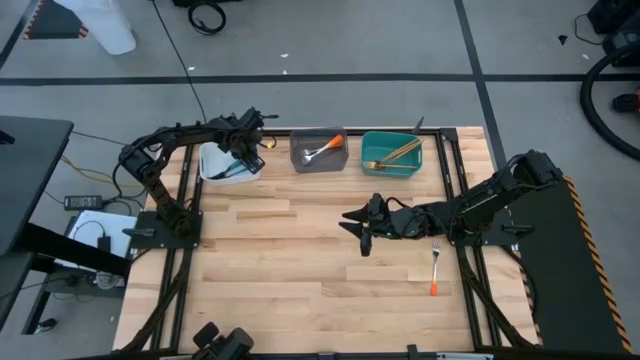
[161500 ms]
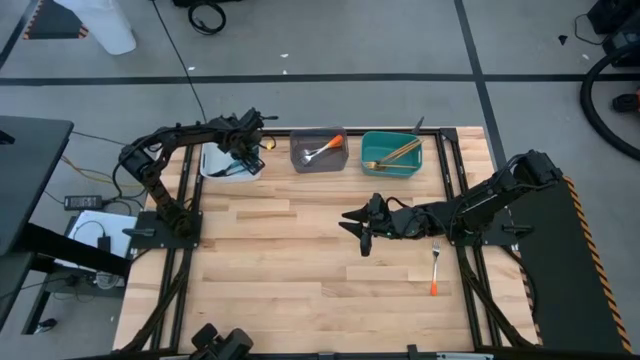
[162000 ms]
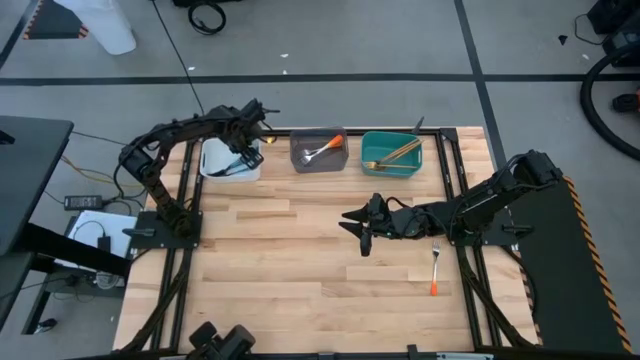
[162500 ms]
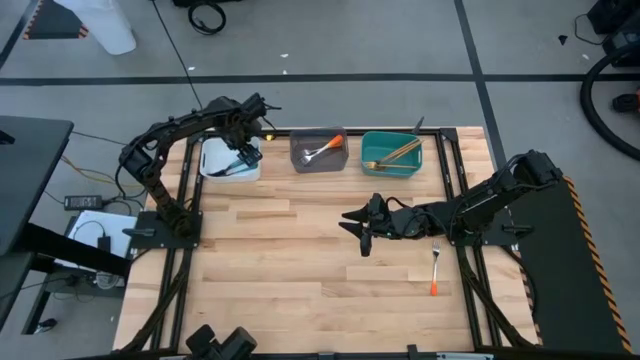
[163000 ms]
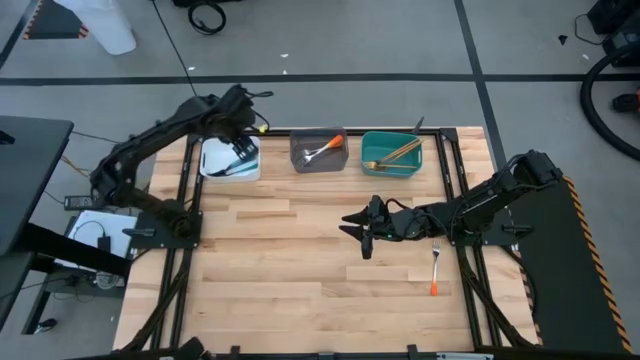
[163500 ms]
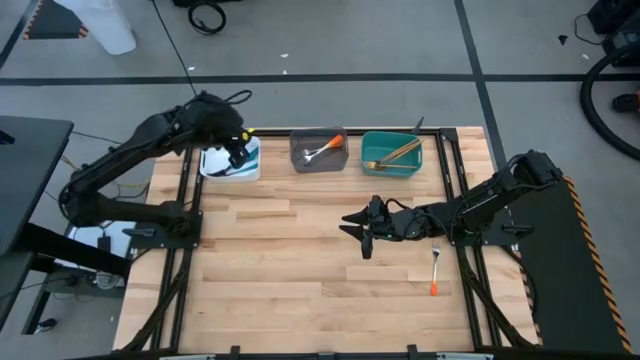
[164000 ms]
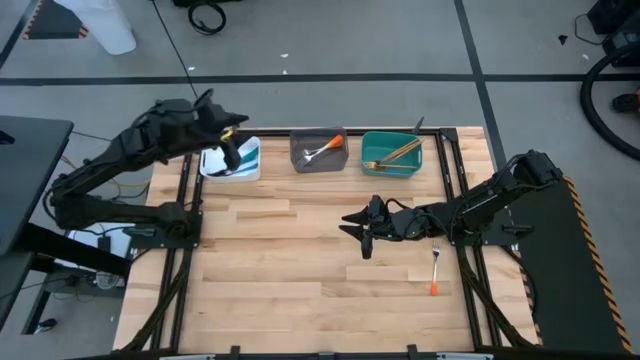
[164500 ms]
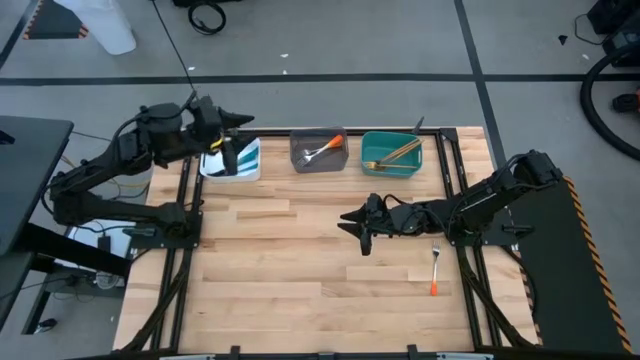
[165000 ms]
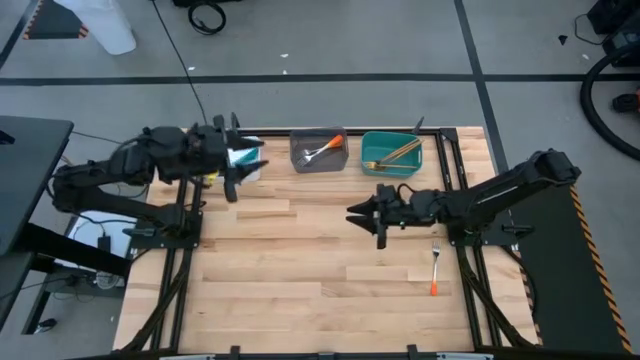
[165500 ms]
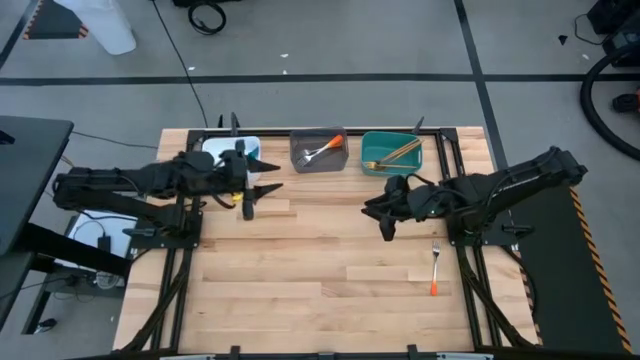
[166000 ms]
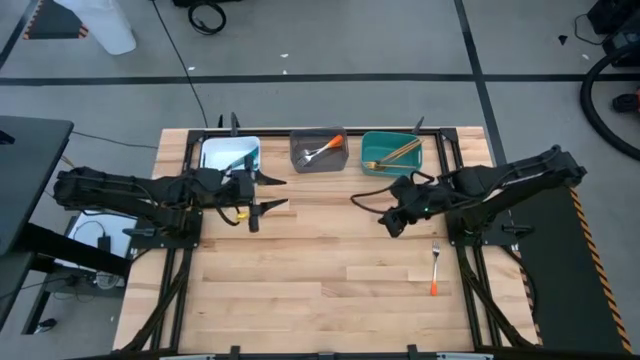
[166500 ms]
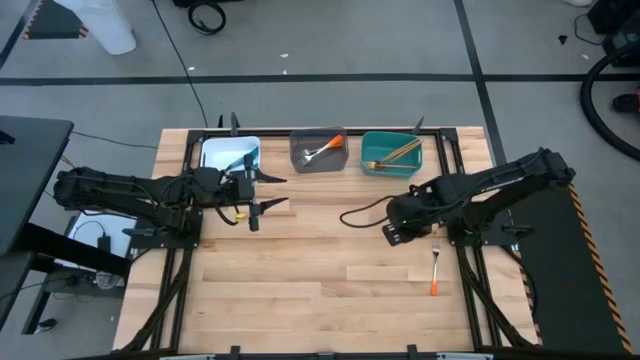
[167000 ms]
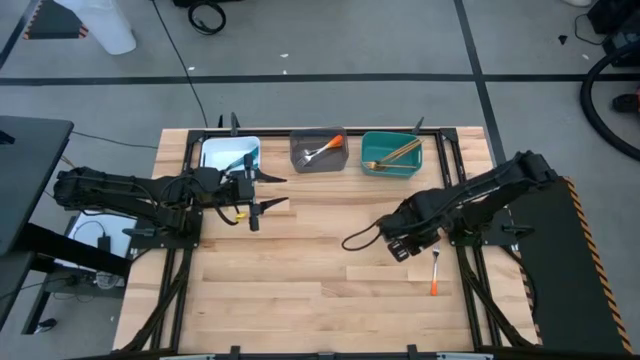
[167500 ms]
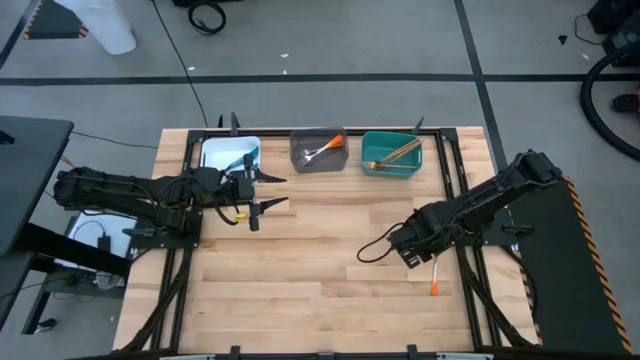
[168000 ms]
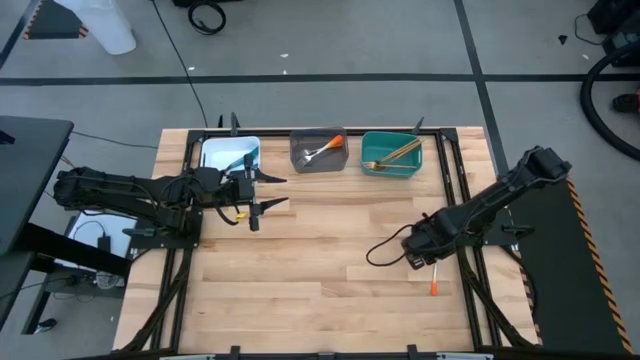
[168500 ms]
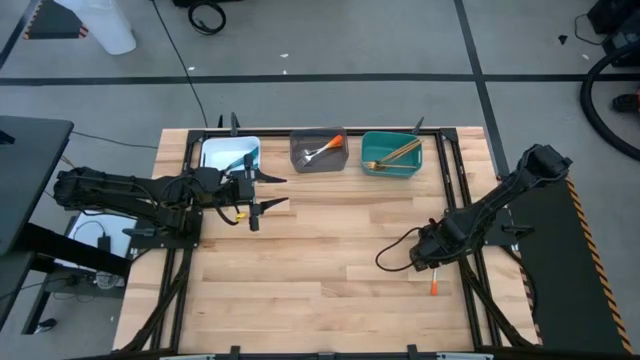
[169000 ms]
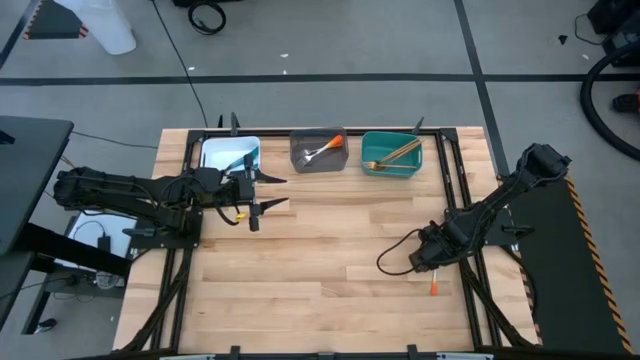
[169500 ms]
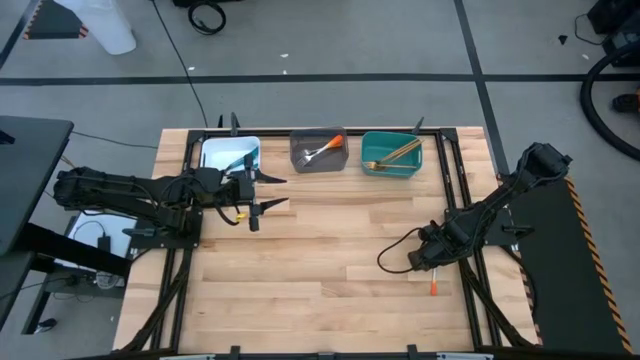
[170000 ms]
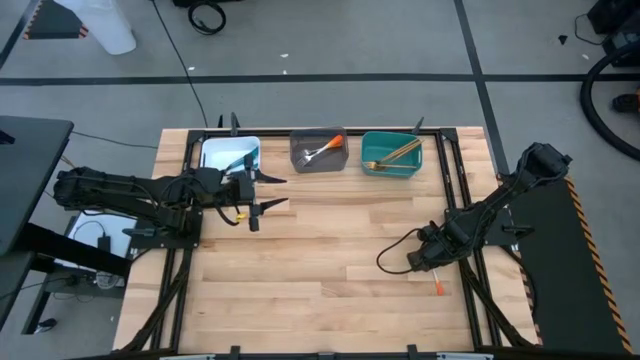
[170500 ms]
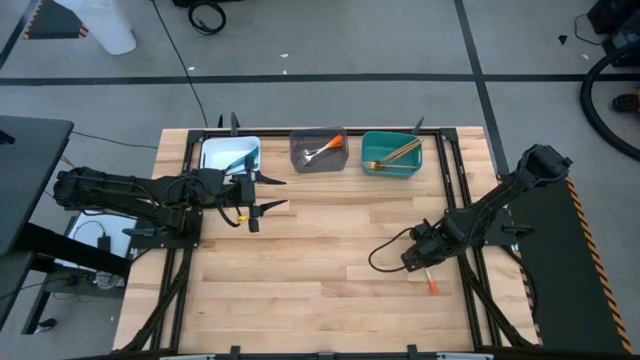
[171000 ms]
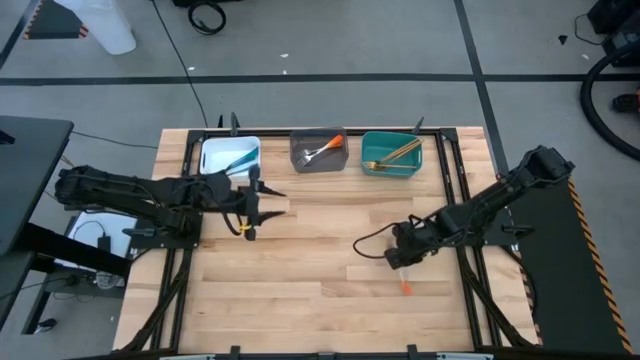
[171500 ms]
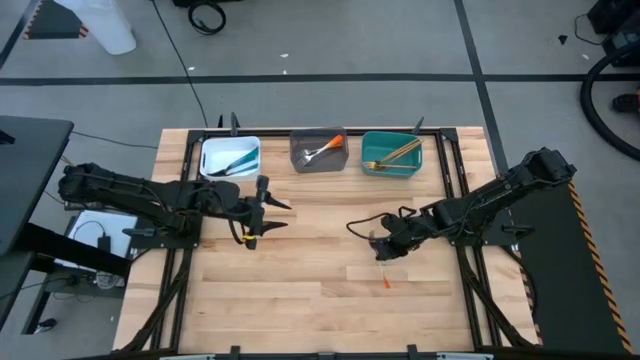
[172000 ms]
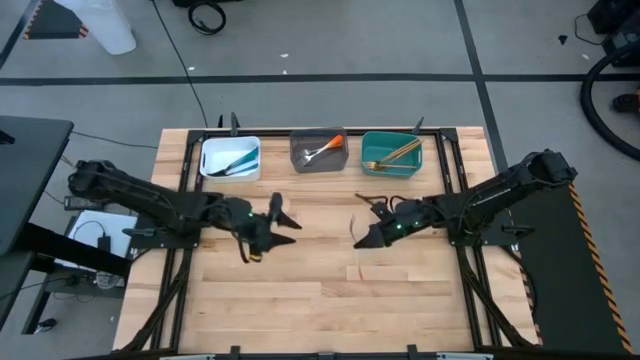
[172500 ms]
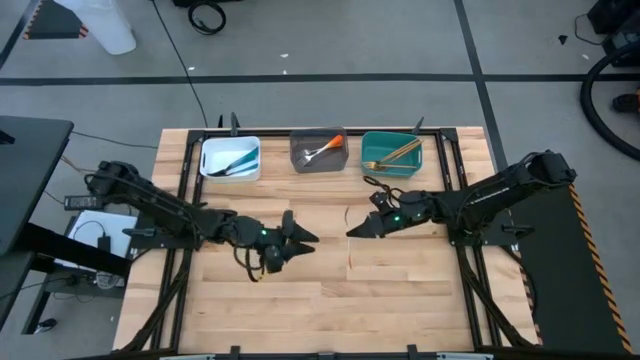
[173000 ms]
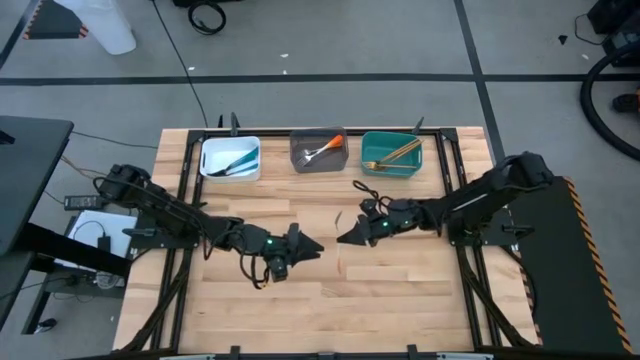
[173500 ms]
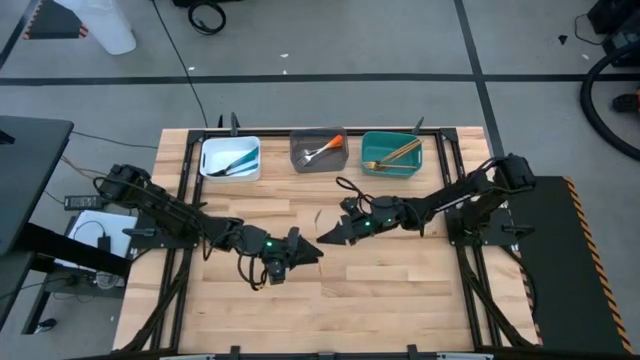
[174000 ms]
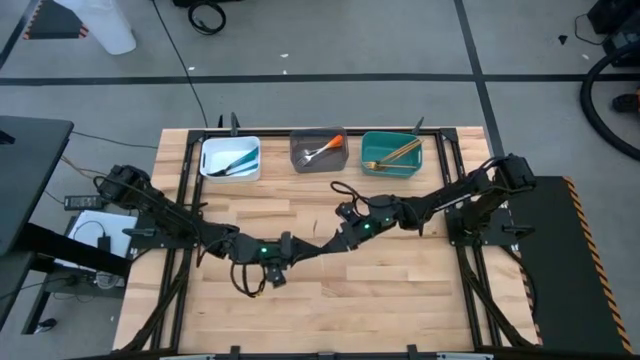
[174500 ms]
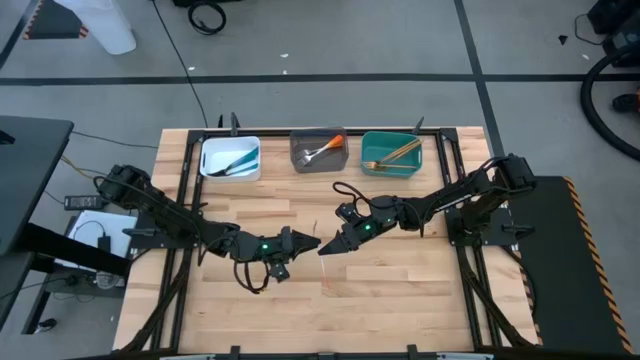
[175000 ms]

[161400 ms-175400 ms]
Task: Sort silverware by color (type)
Put the orange fork into the black bin

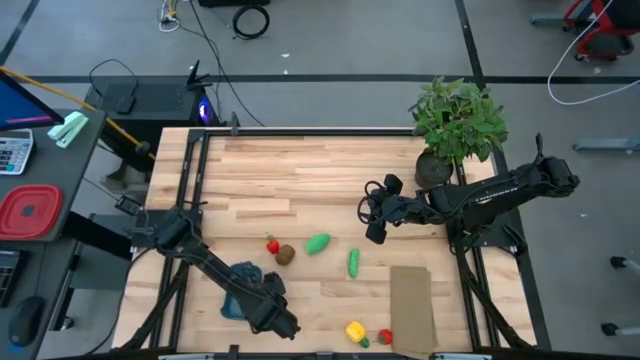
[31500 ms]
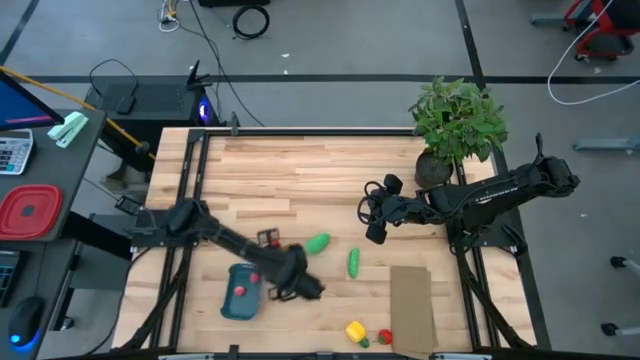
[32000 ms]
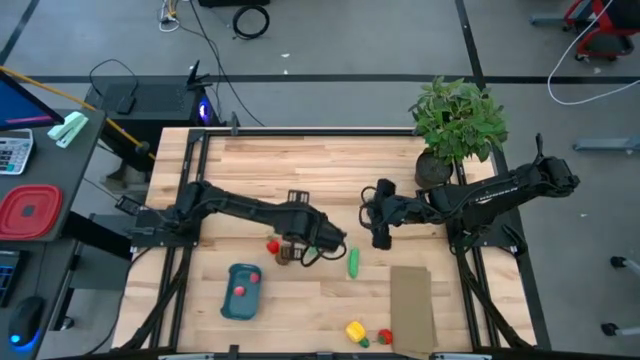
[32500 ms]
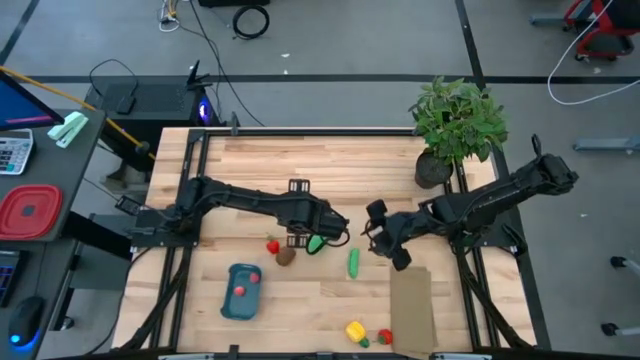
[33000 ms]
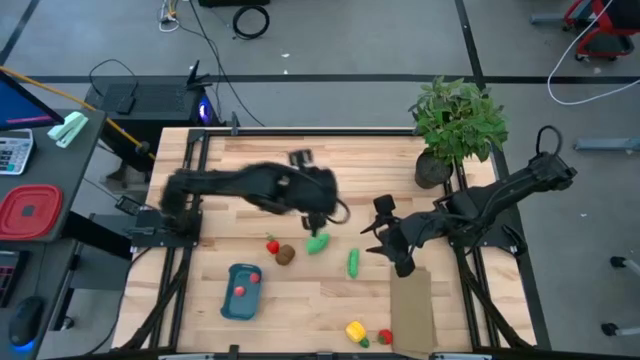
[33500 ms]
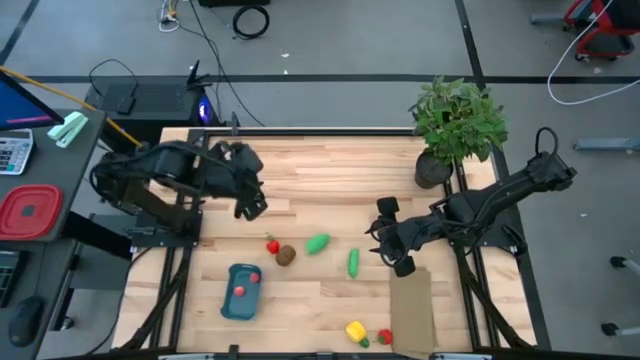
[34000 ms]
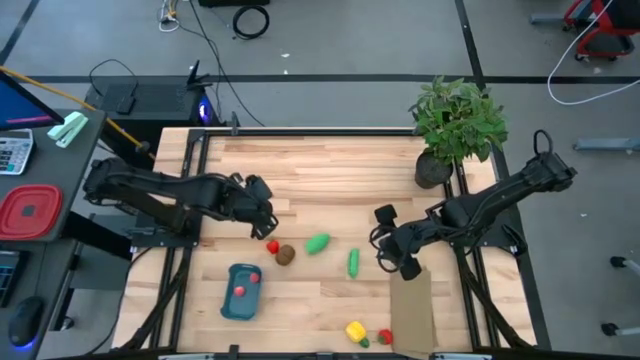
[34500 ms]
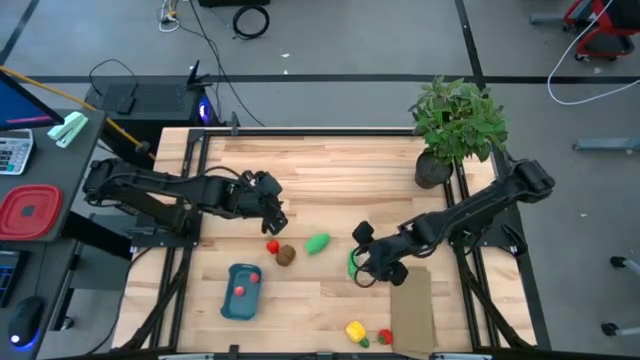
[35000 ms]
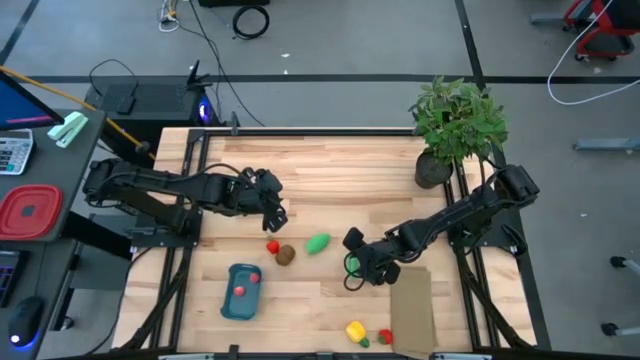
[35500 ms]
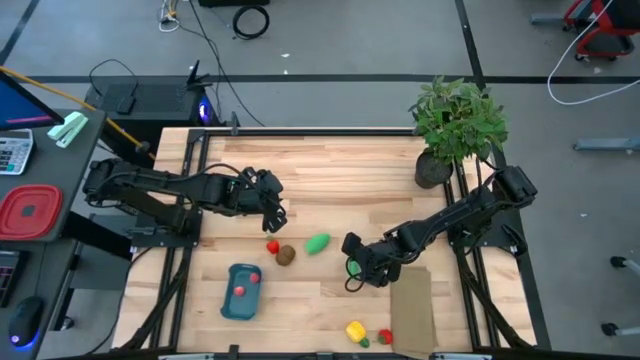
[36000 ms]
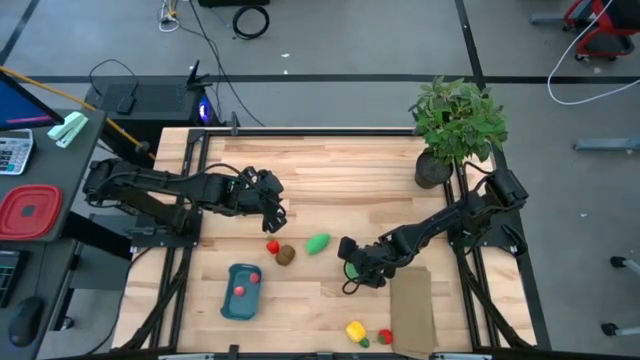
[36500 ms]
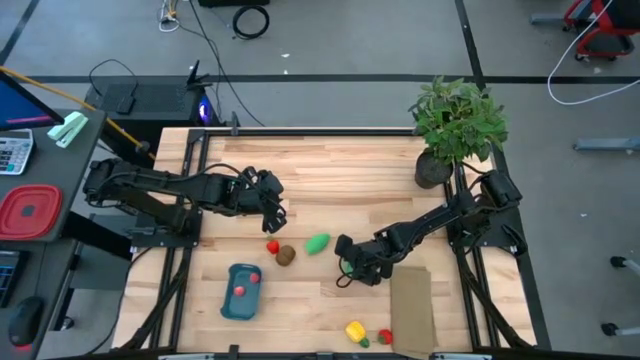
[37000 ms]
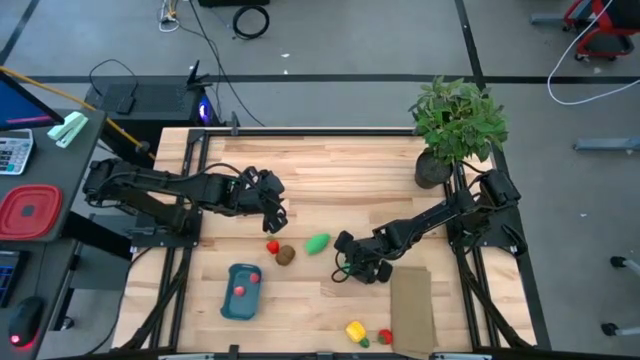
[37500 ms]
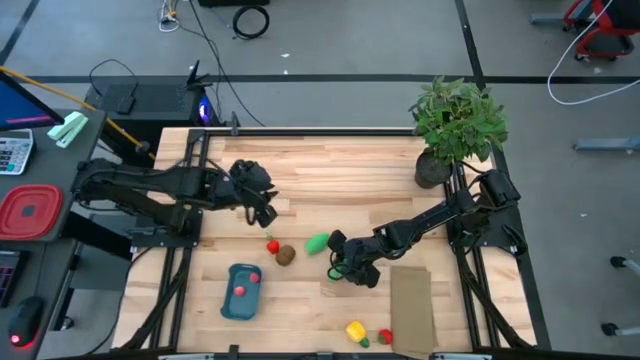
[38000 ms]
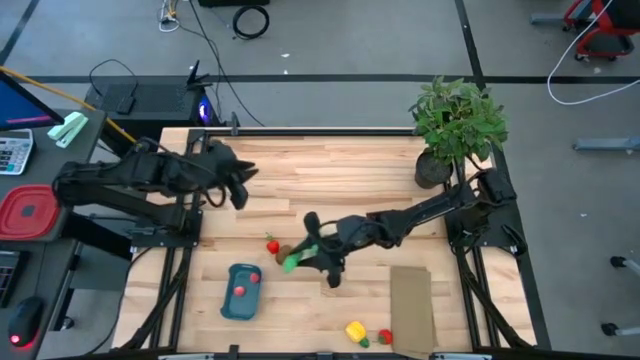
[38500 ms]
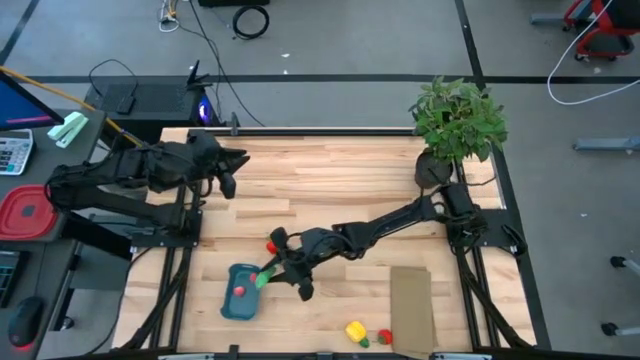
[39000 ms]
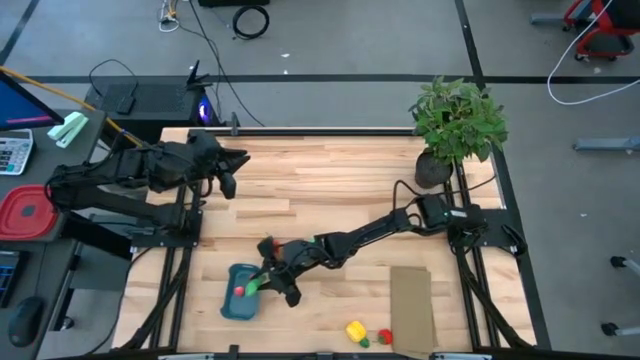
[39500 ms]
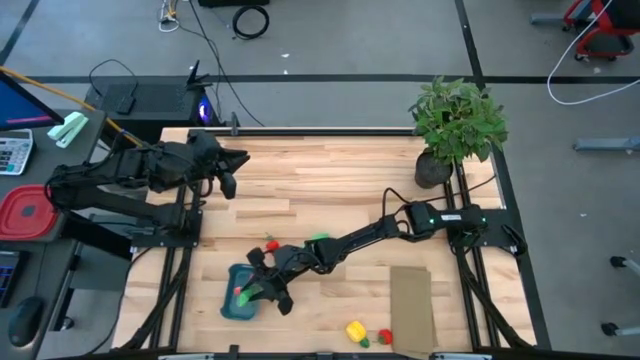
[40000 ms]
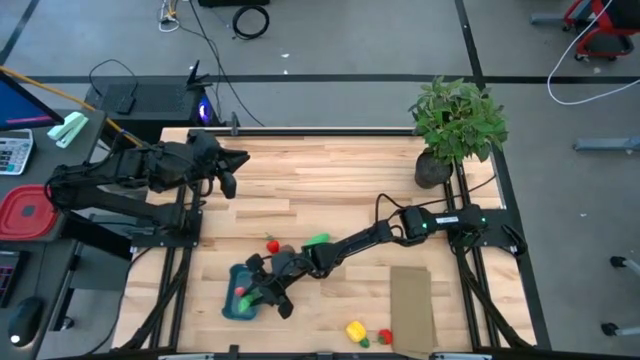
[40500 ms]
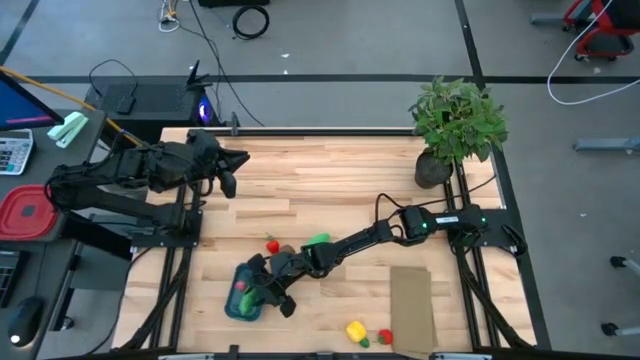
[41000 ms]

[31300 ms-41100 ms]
Task: Pick and placing Produce into tupperware
Put the green peas into the blue bin
